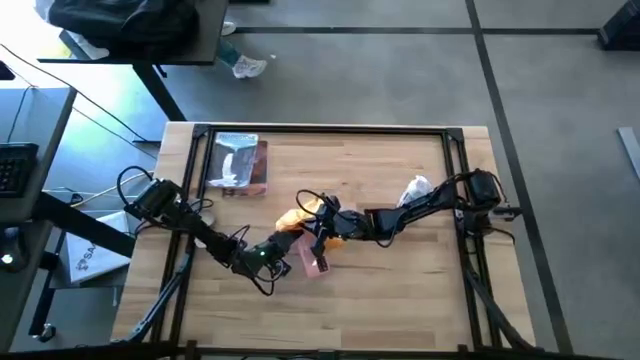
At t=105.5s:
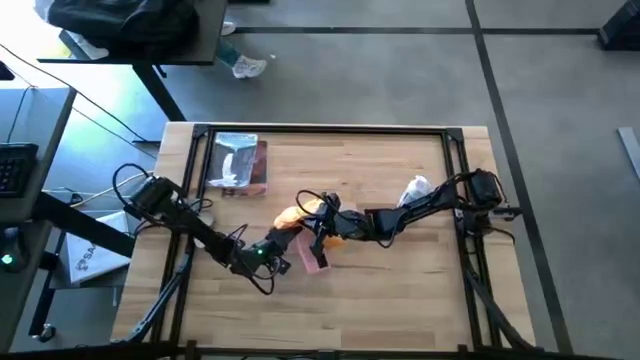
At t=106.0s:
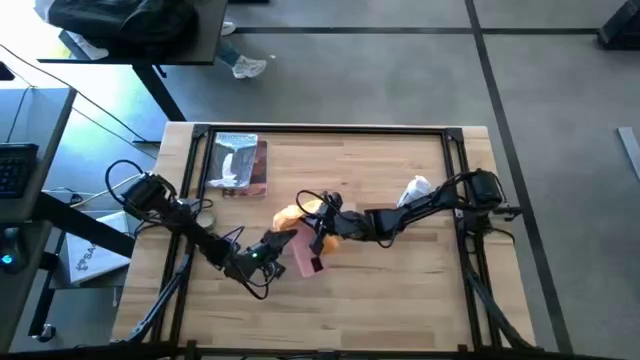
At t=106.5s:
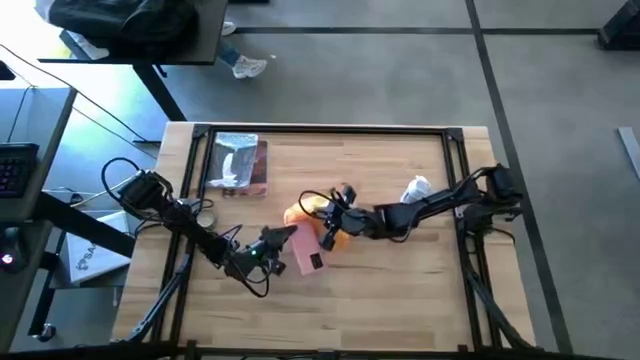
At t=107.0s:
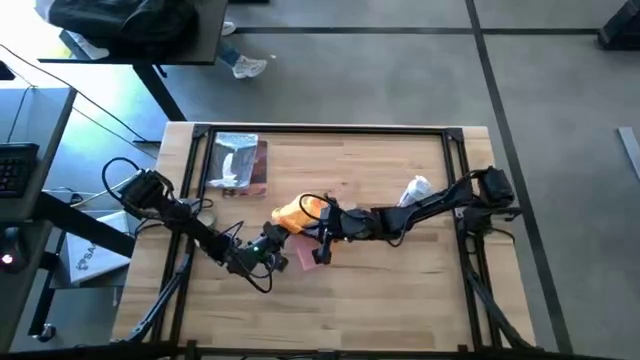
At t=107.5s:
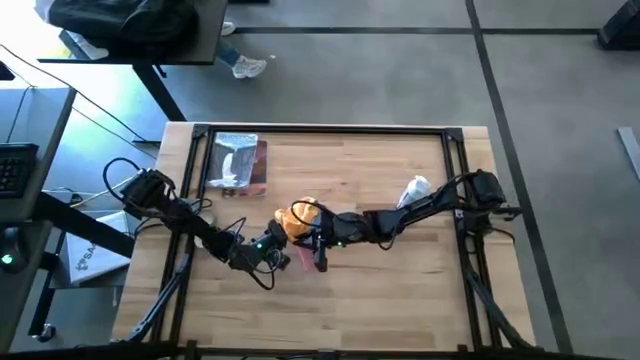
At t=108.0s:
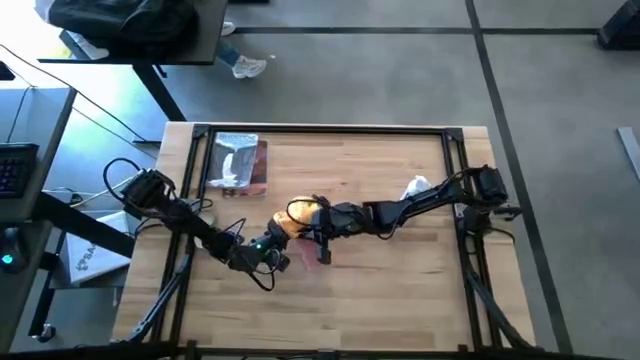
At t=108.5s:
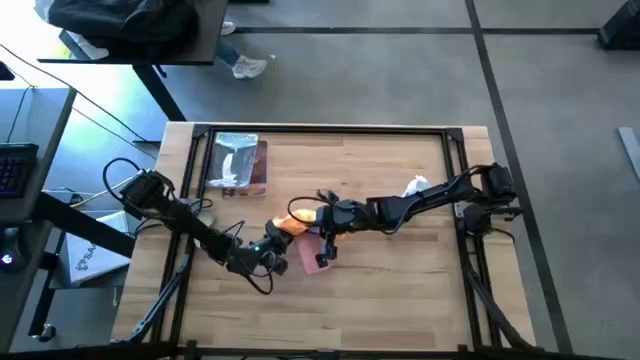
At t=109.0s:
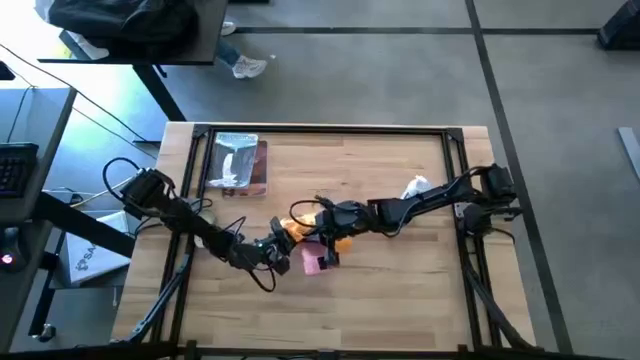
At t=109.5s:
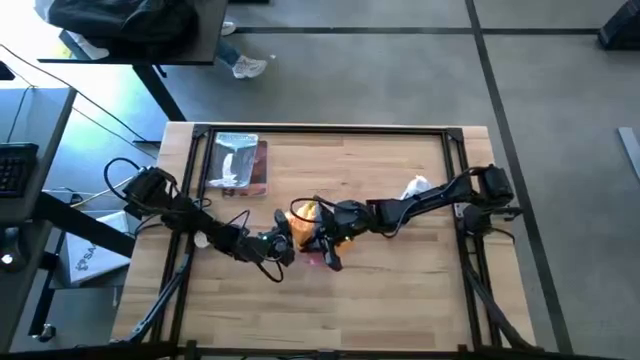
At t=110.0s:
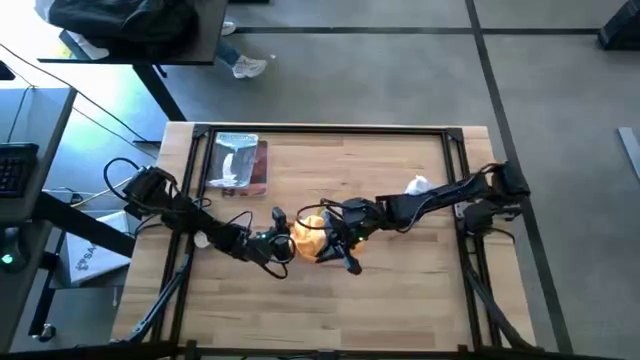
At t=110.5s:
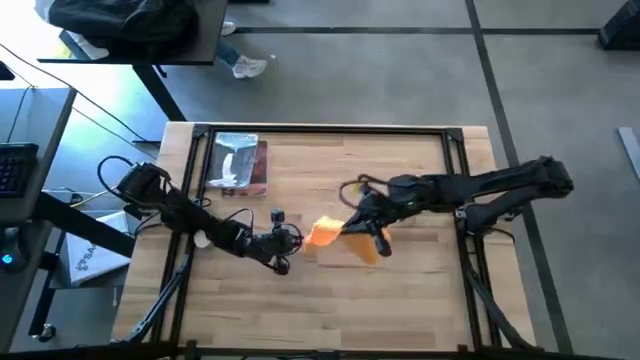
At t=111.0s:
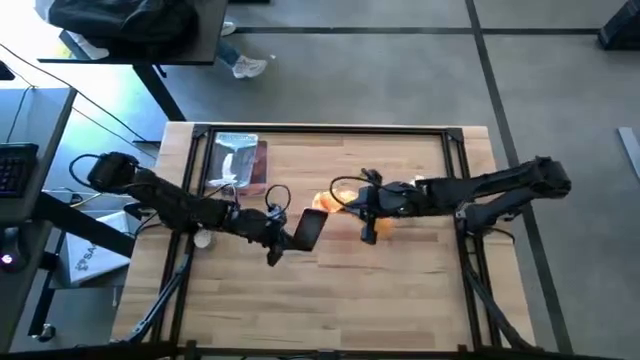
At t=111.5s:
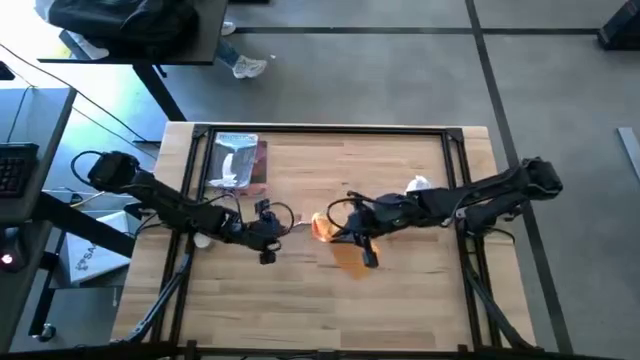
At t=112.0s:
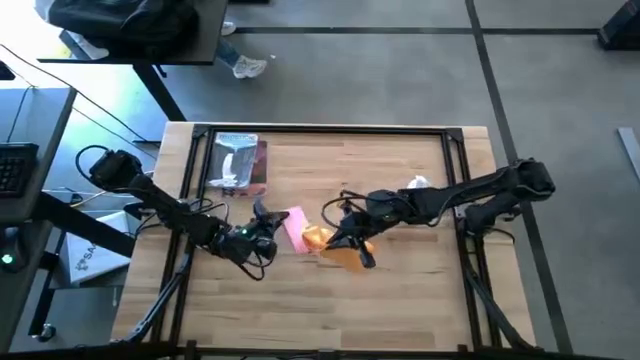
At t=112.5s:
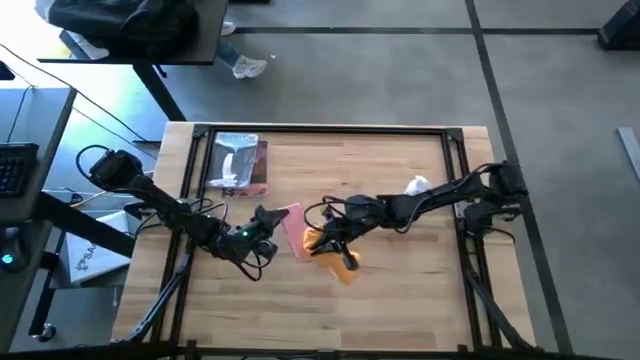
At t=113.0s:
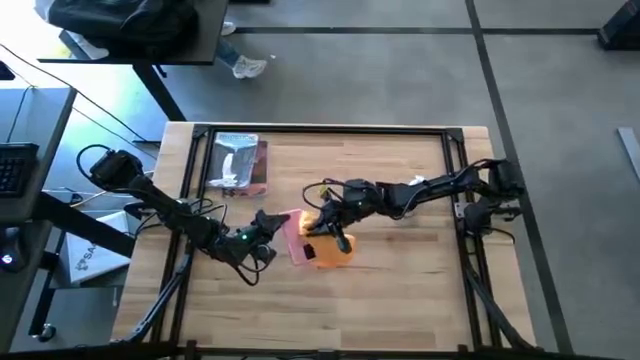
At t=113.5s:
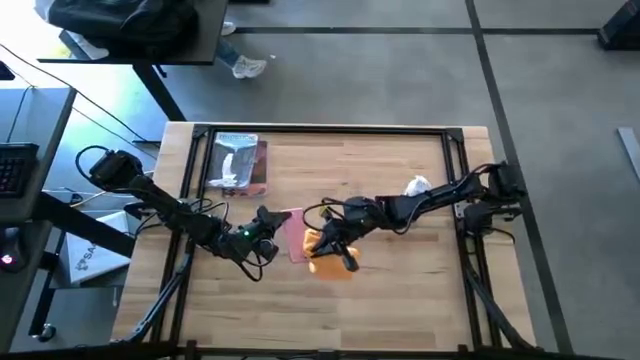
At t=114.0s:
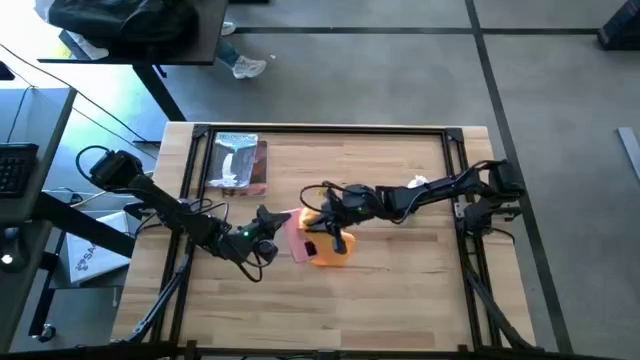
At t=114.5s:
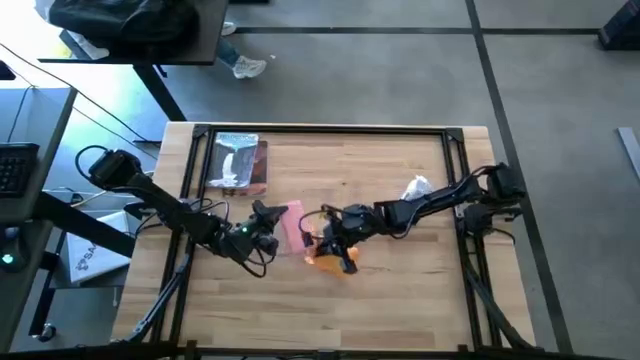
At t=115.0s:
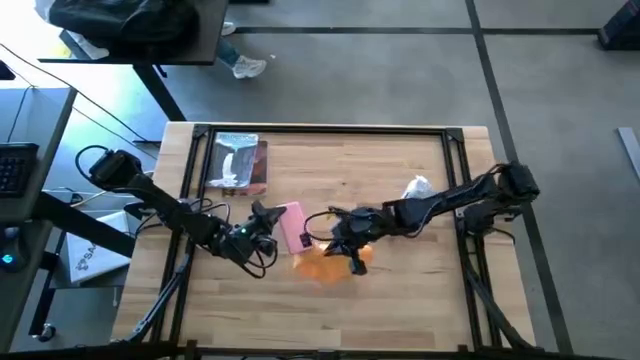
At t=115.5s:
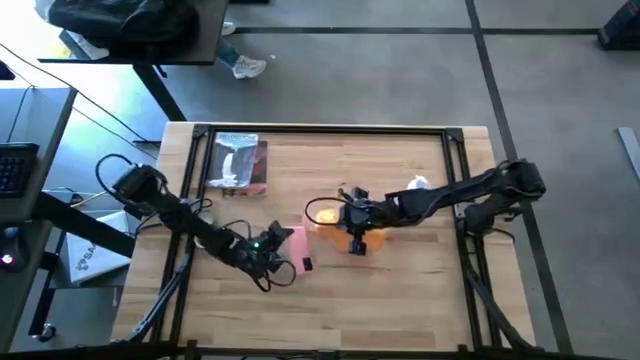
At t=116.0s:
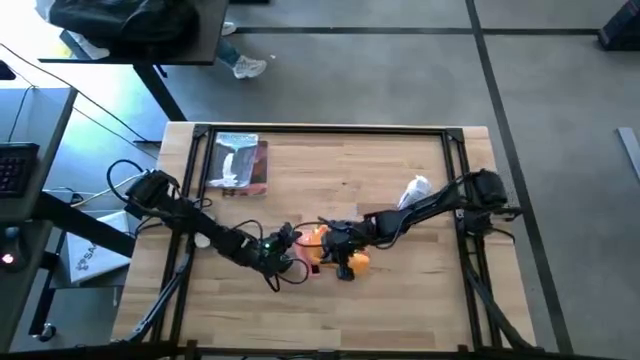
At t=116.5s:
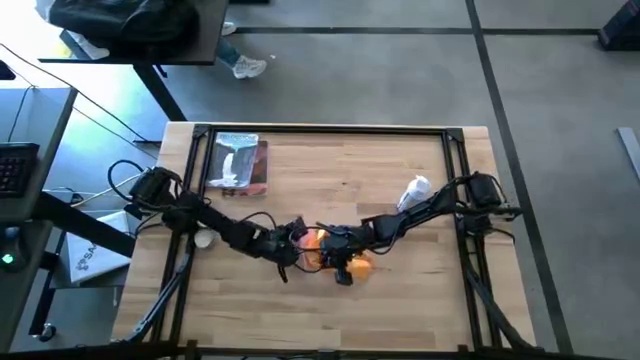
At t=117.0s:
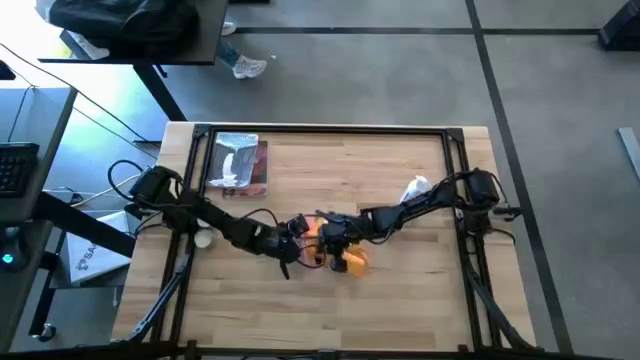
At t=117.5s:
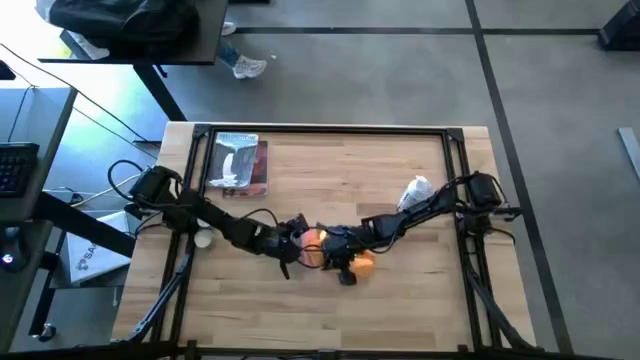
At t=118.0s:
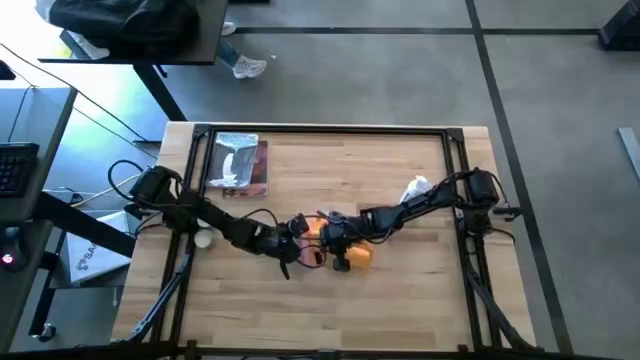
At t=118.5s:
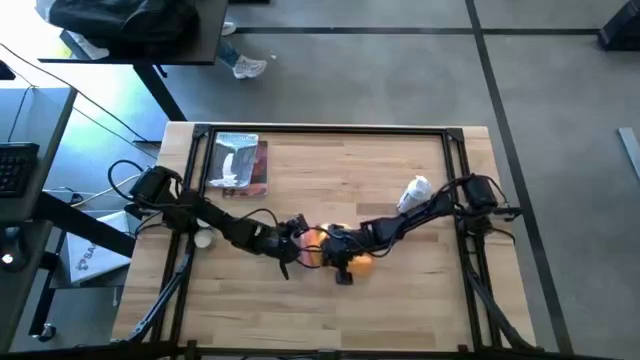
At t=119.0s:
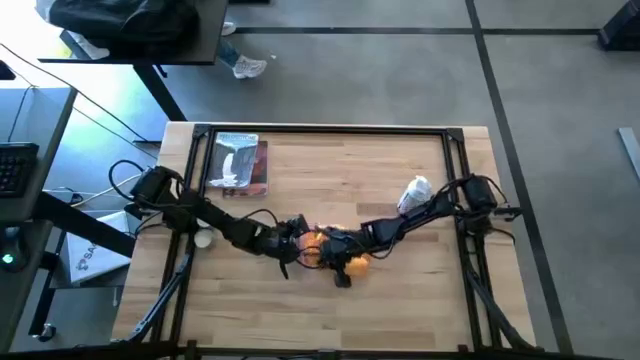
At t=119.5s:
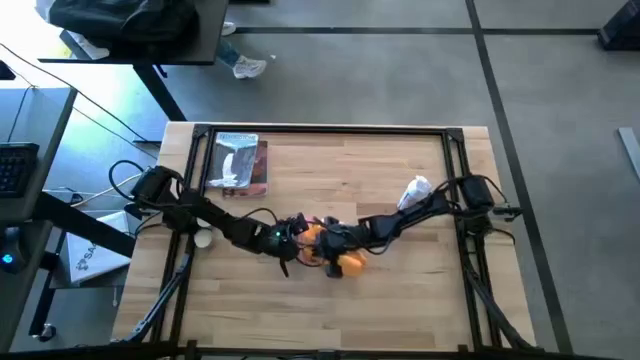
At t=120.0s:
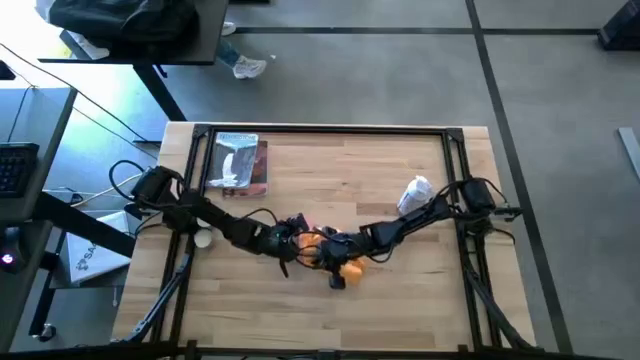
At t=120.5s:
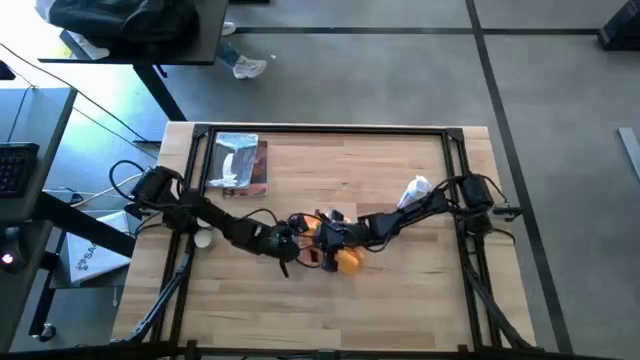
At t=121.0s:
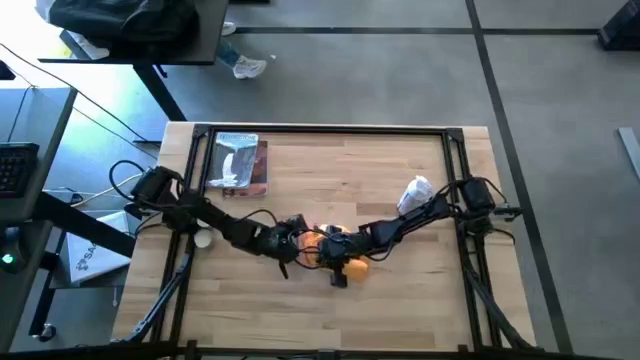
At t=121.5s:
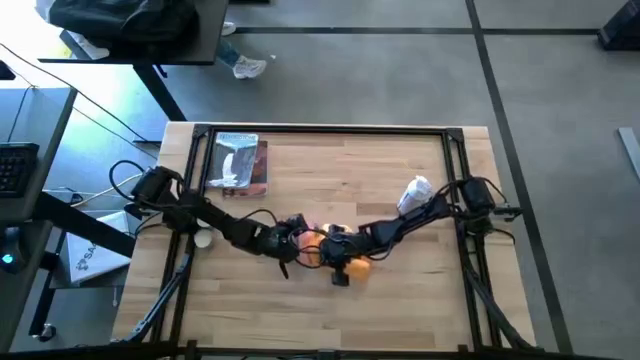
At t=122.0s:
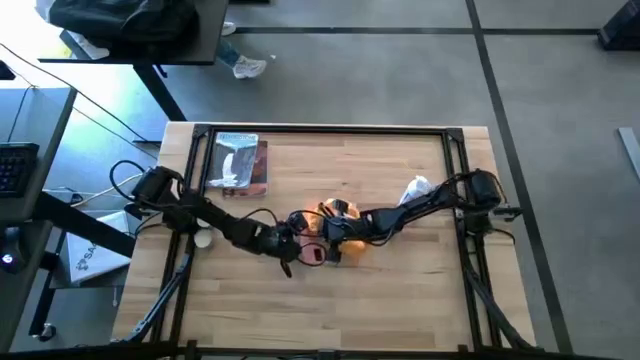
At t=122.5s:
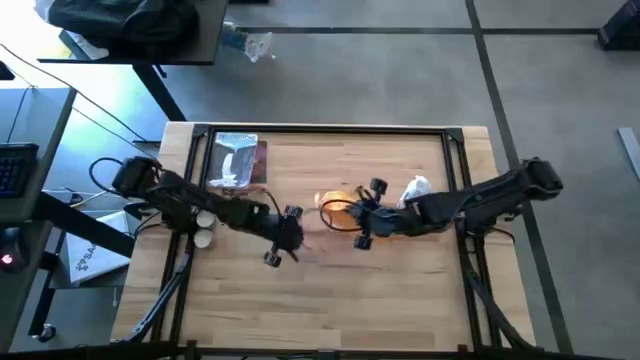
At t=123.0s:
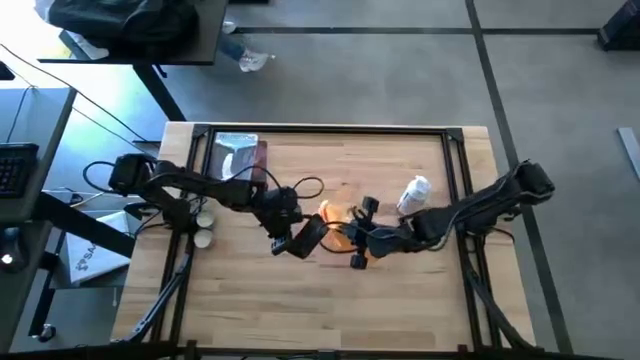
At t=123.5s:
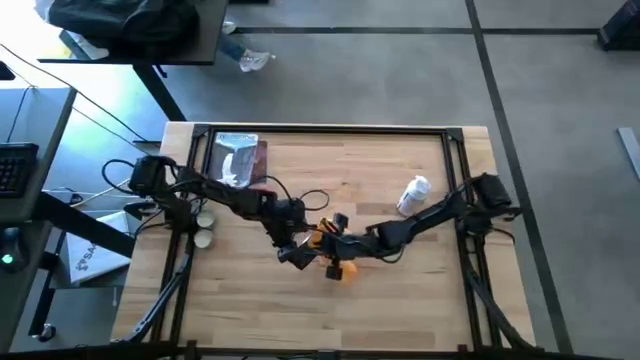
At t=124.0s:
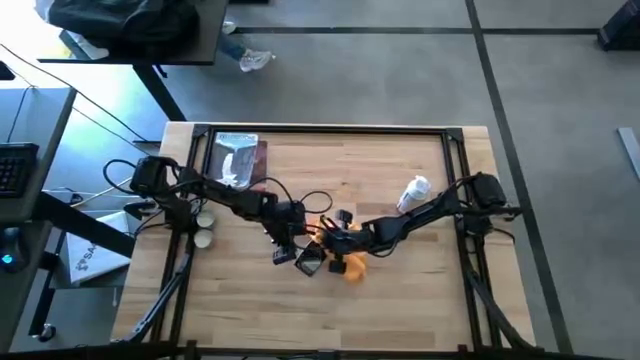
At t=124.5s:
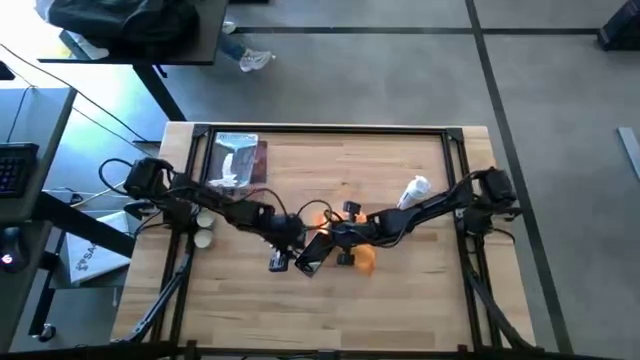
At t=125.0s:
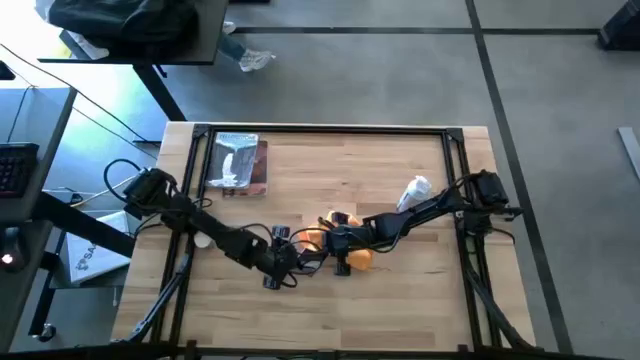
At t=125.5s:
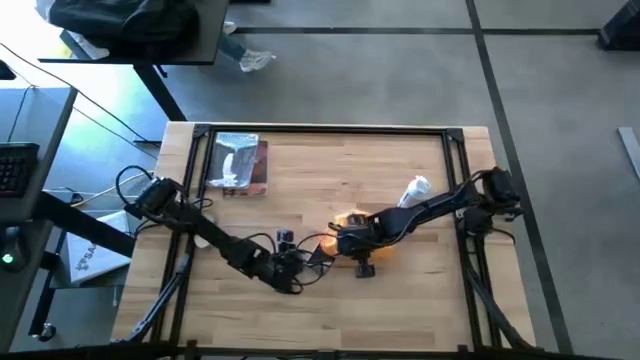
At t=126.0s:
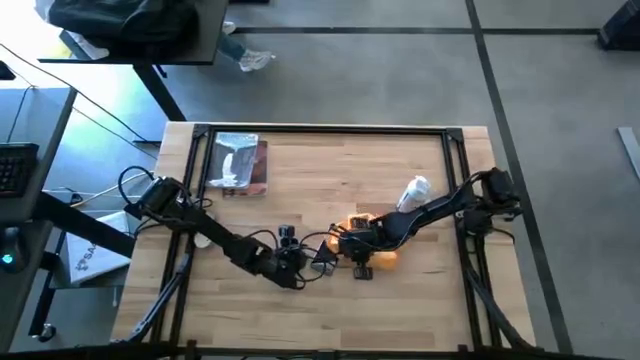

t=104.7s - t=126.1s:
Task: Apply microfiber cloth
Wipe the front and back of the cellphone with the yellow microfiber cloth
